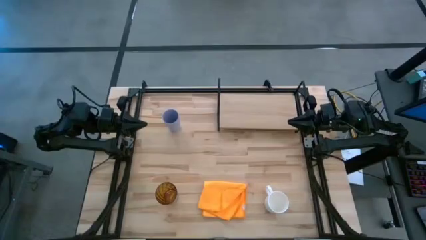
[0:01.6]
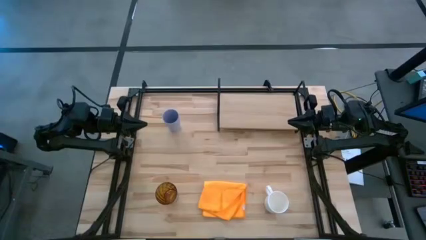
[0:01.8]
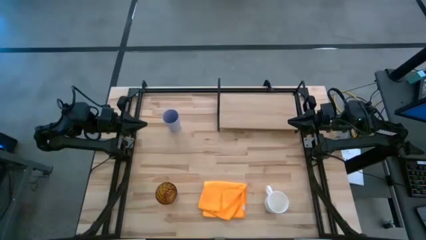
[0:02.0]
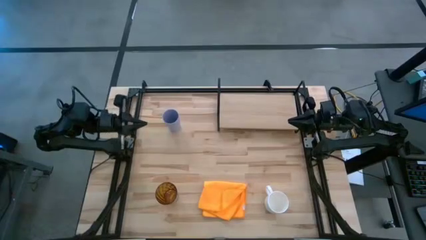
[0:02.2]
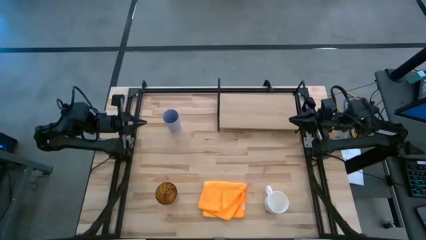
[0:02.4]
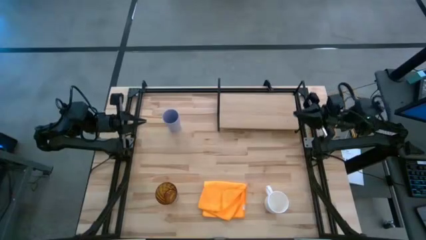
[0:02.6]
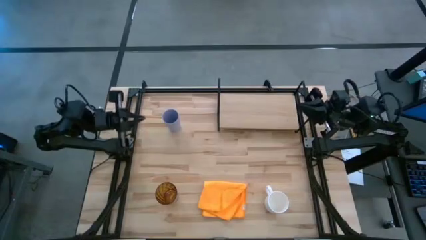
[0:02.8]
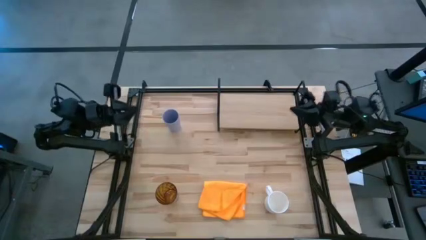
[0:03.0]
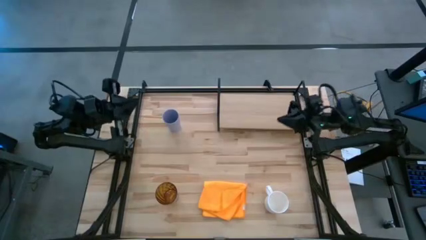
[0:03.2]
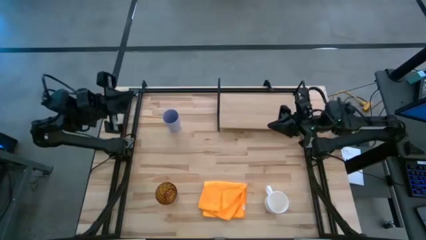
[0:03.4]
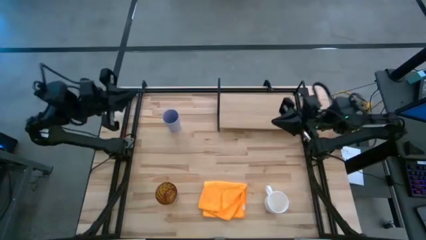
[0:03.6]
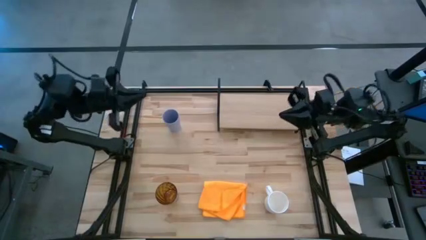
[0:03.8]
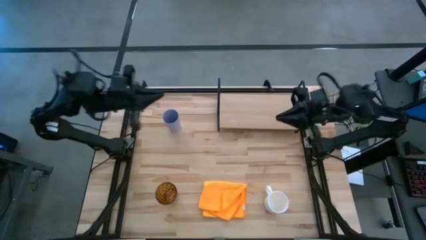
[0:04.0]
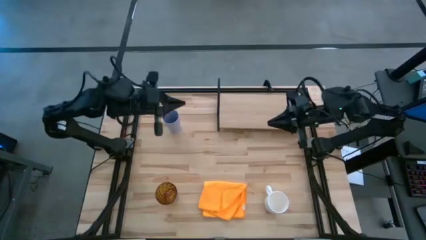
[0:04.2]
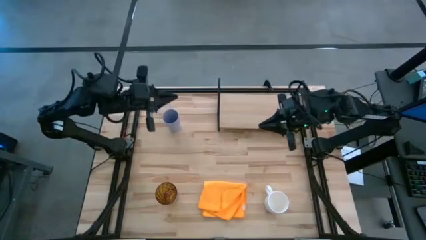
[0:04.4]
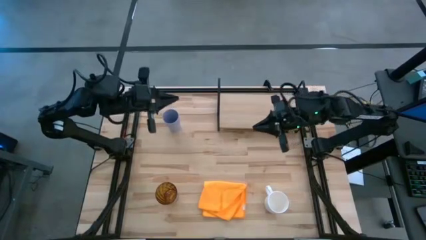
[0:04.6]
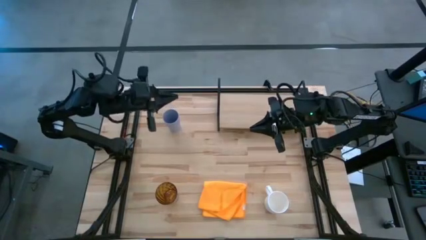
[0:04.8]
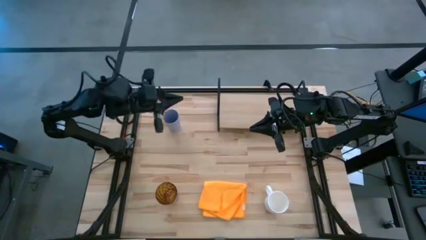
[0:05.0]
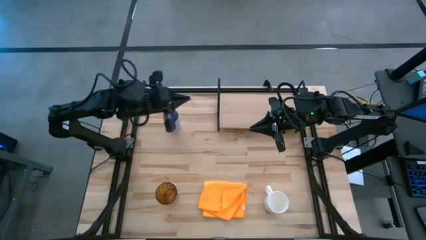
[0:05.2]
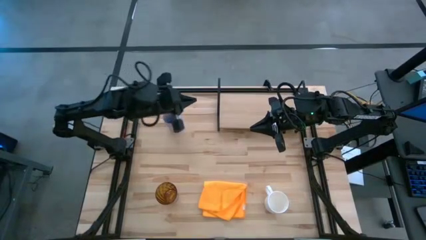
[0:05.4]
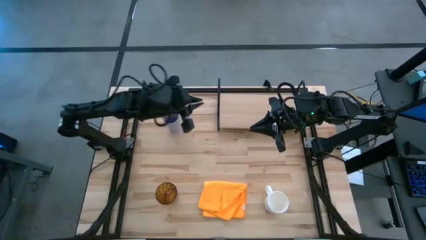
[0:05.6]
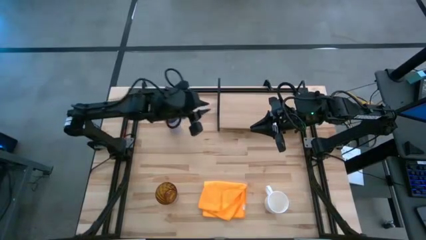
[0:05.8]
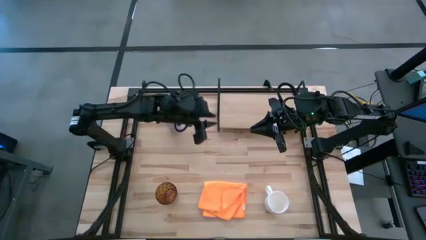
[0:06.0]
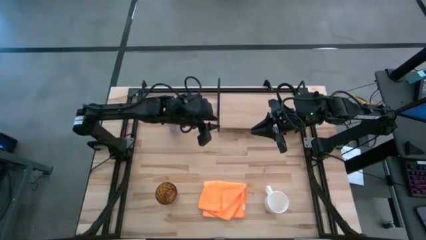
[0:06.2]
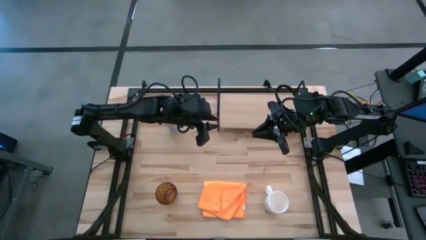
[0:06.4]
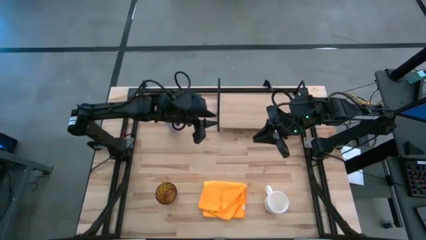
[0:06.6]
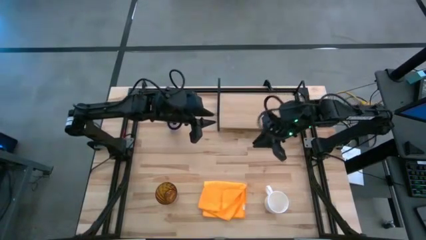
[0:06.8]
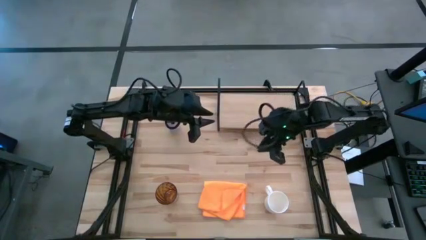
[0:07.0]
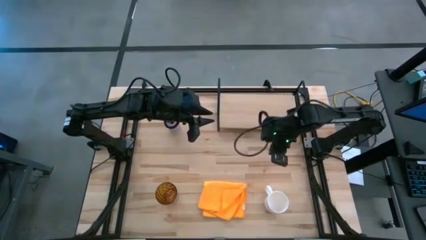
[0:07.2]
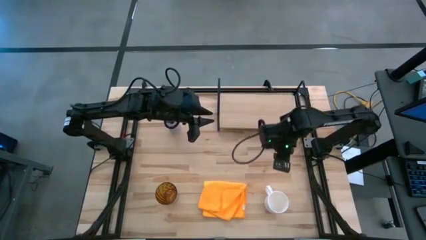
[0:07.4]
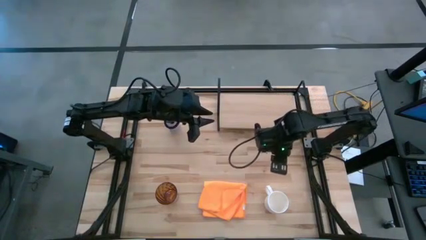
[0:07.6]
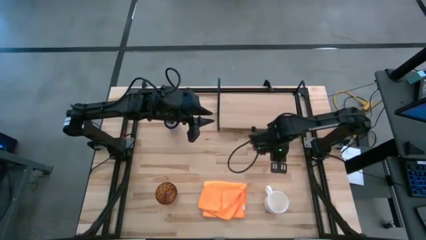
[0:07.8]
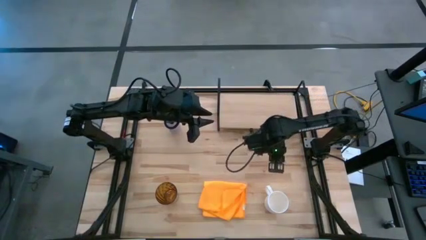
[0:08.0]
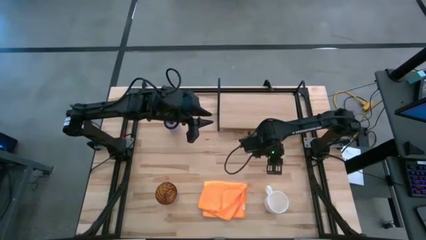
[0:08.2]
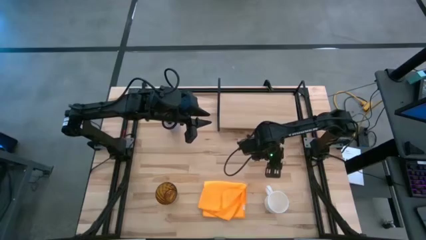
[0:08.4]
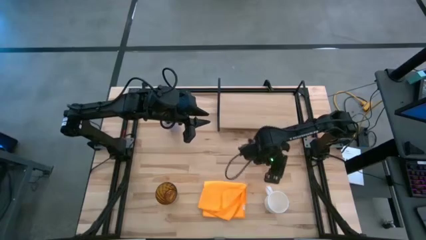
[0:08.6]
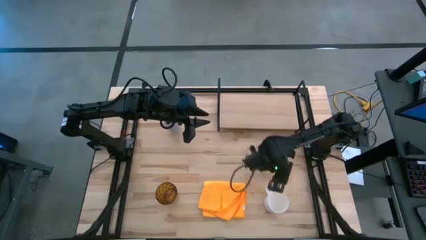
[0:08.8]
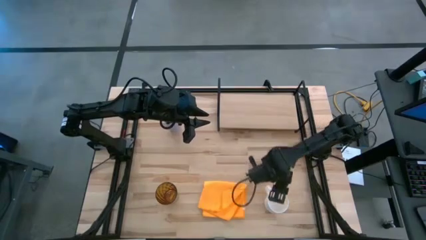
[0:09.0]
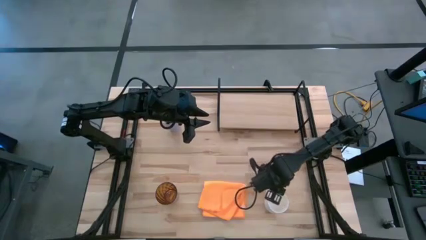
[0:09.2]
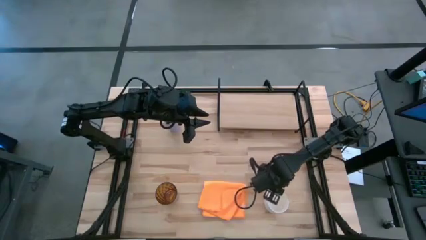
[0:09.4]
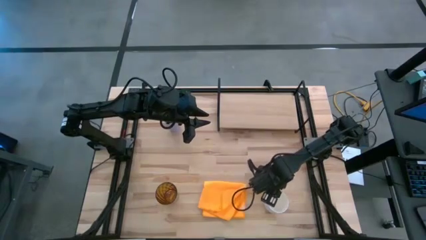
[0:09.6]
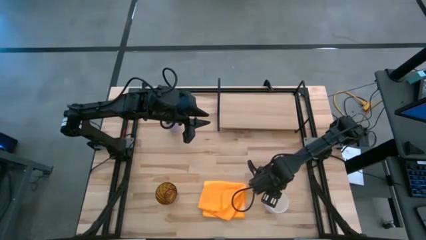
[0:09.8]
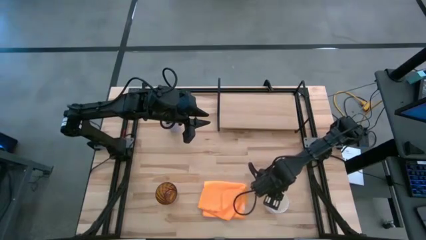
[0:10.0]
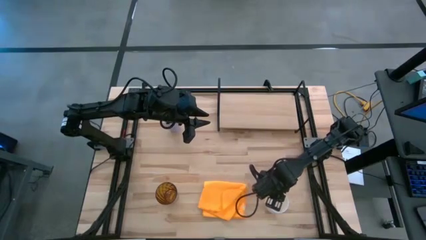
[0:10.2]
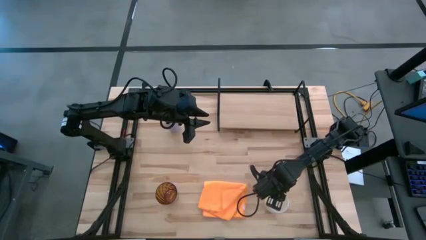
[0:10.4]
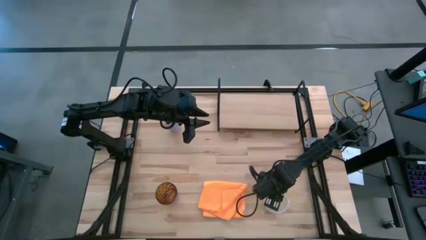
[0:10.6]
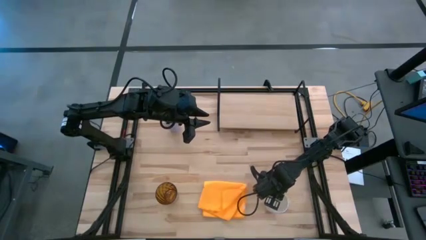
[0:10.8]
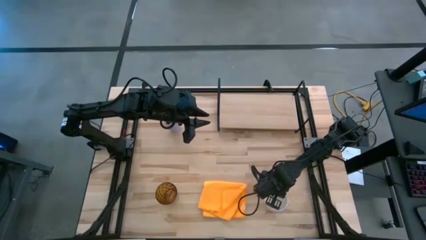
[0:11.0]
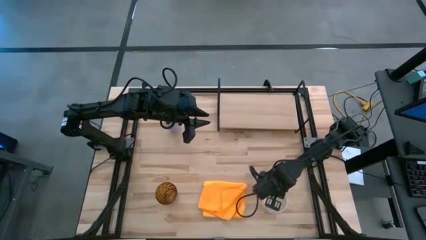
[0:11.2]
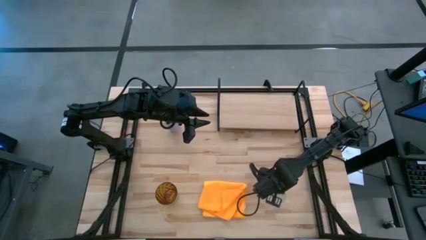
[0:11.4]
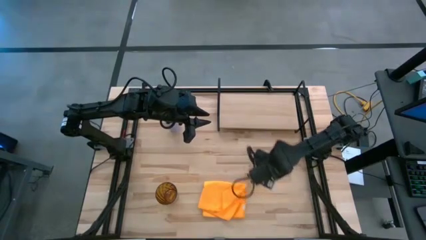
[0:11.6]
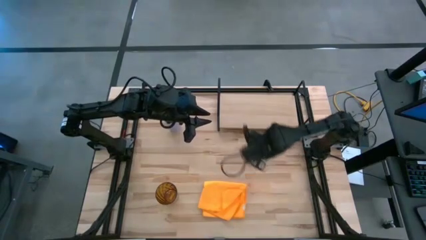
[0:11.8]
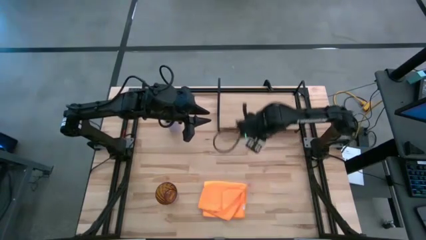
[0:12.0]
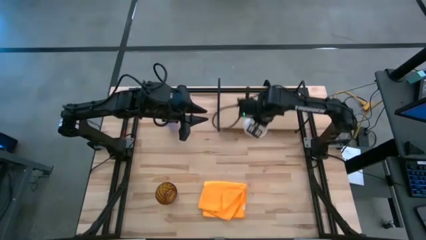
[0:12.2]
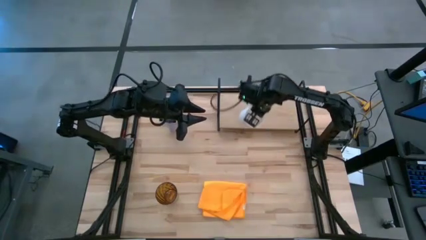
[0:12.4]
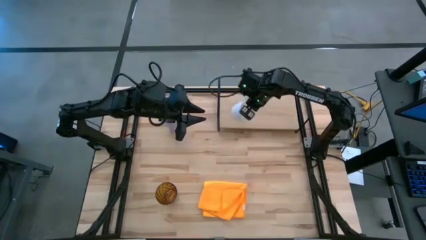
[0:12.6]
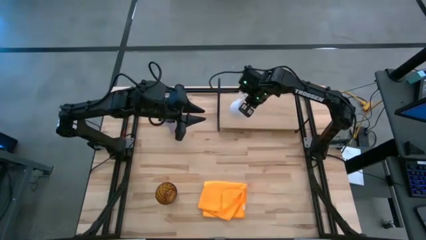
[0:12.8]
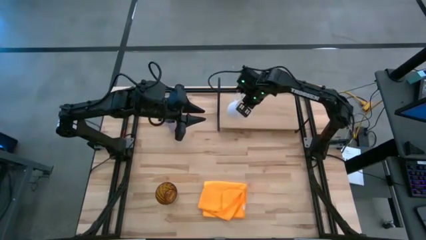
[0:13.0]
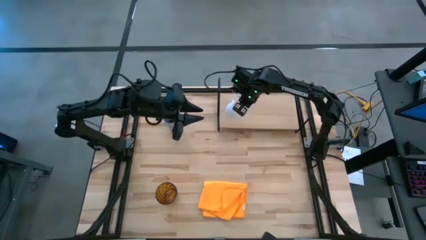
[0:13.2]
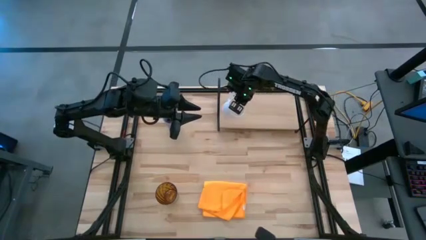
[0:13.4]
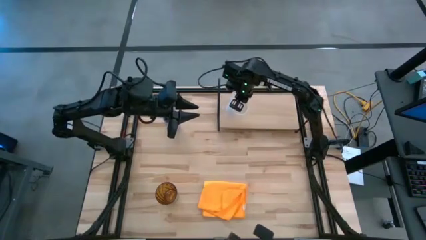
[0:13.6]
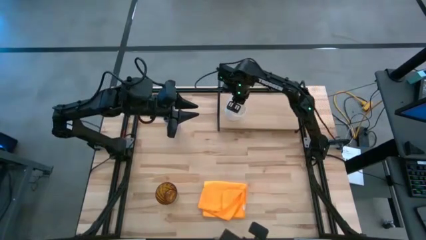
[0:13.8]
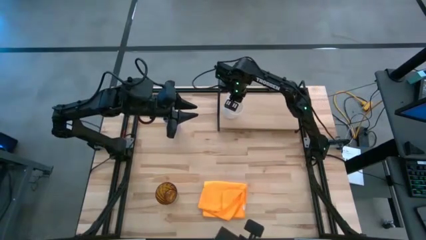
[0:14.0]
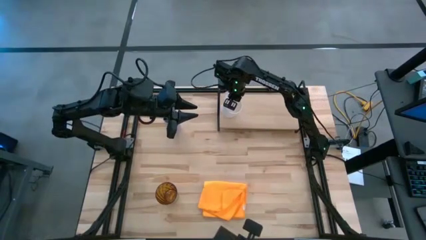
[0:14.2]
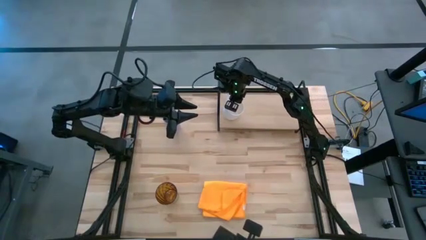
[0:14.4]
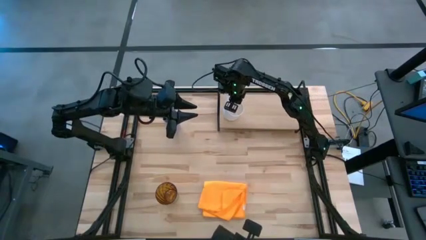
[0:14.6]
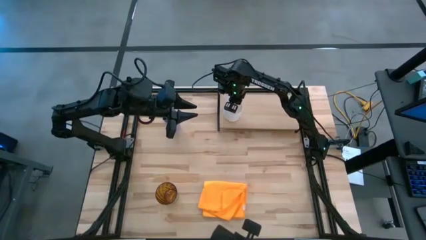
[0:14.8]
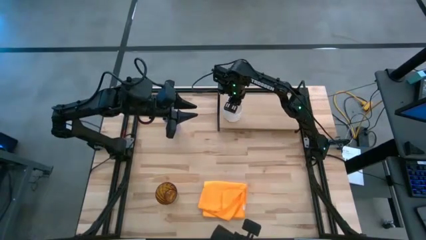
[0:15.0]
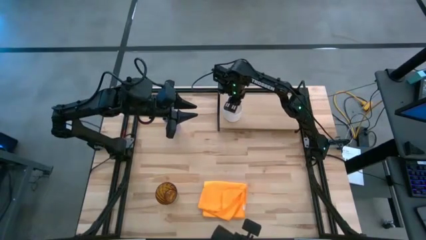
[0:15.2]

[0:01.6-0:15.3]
Task: Stack small to large cups/mugs on shelf
Put the white mug on the shelf
